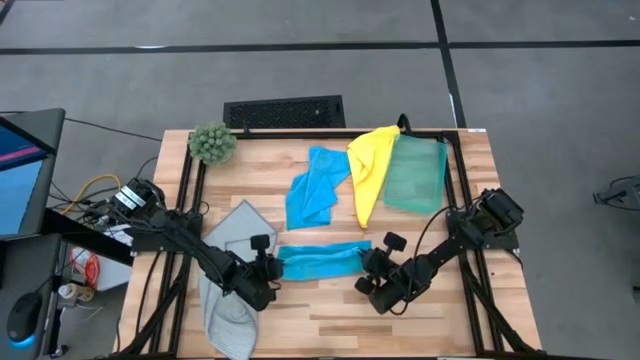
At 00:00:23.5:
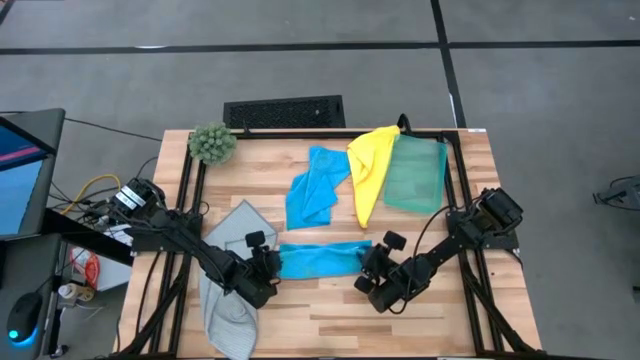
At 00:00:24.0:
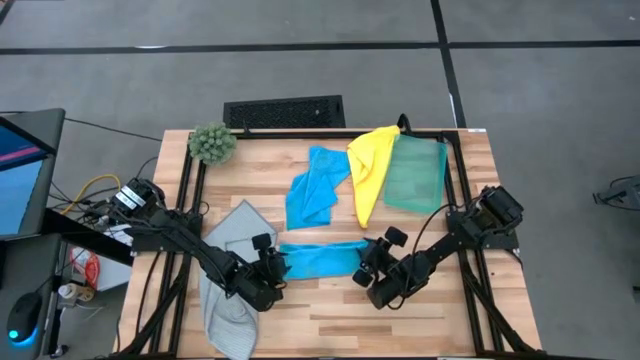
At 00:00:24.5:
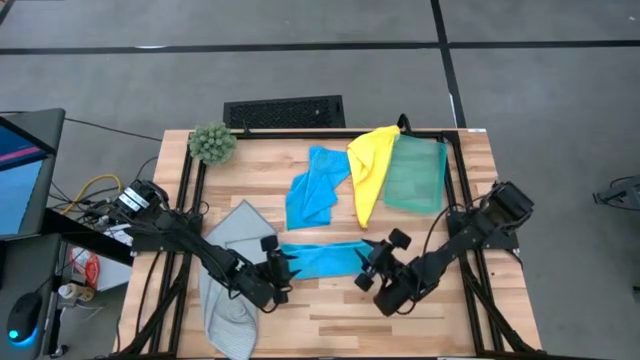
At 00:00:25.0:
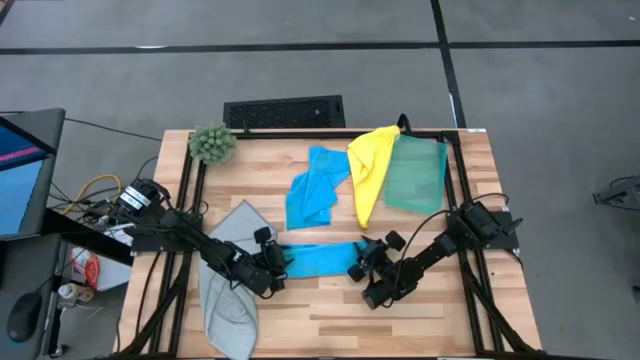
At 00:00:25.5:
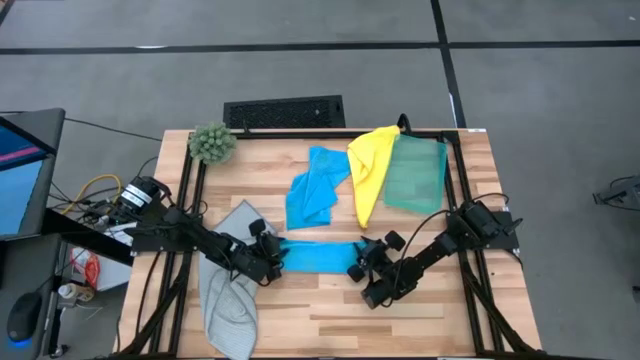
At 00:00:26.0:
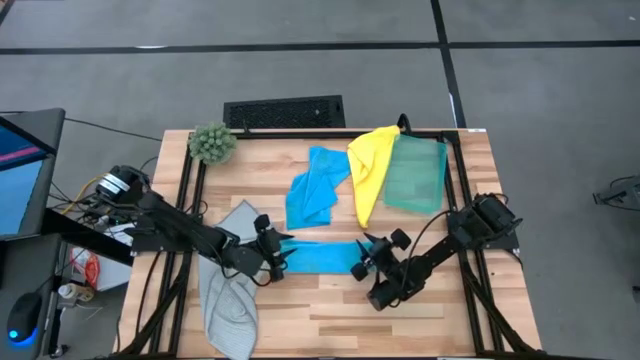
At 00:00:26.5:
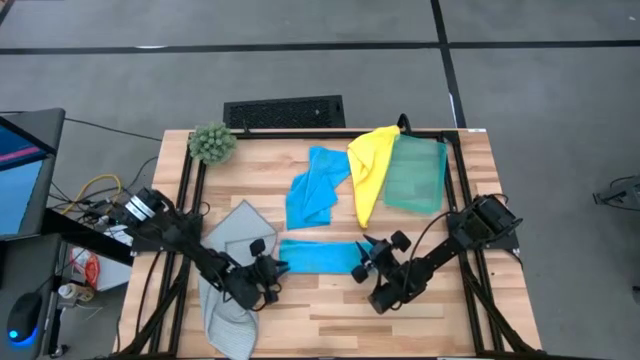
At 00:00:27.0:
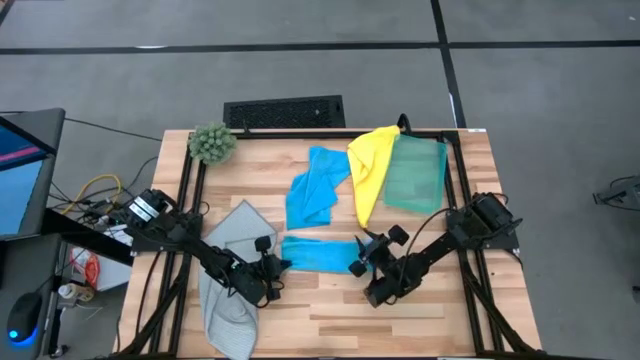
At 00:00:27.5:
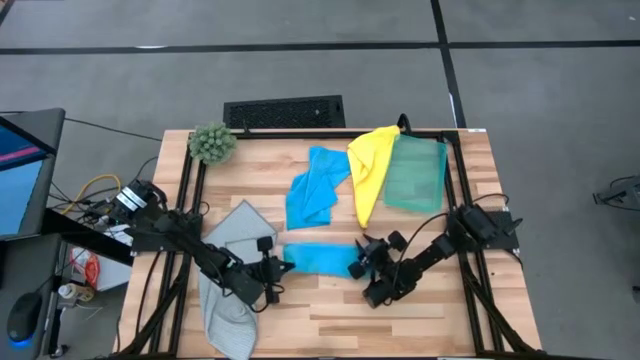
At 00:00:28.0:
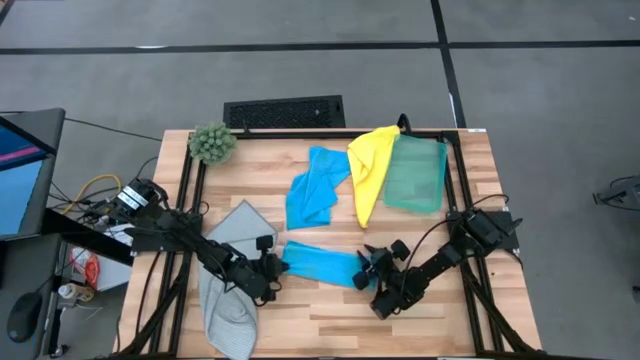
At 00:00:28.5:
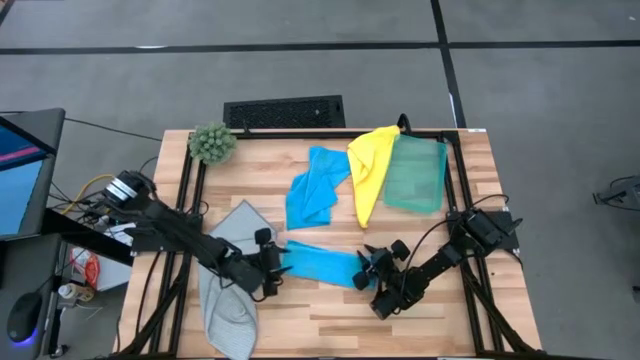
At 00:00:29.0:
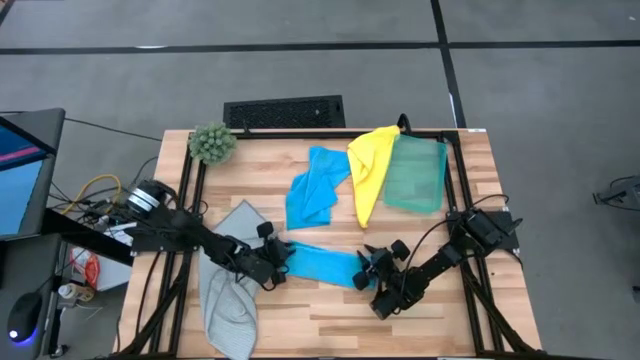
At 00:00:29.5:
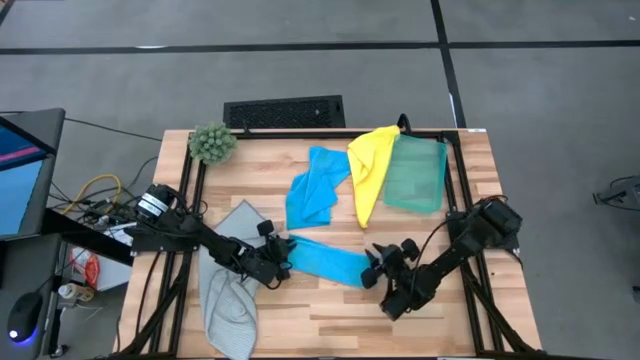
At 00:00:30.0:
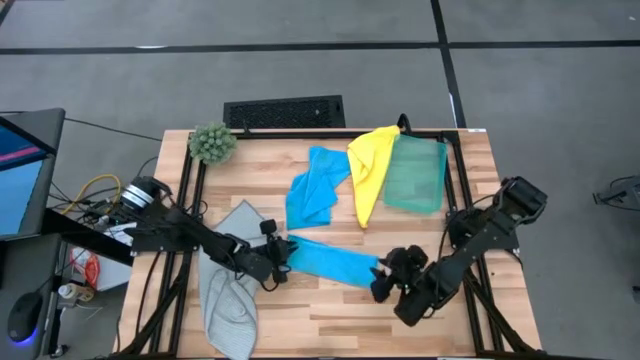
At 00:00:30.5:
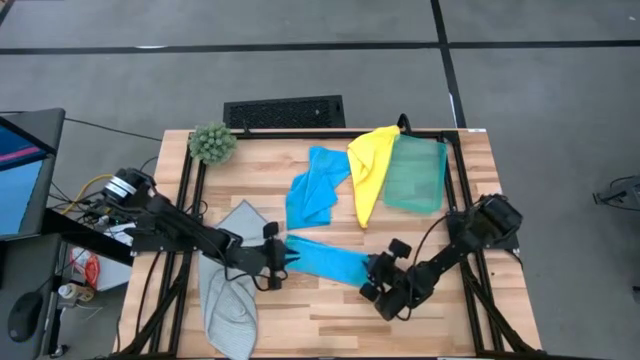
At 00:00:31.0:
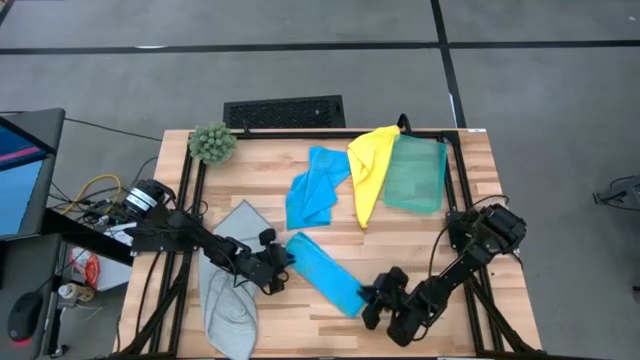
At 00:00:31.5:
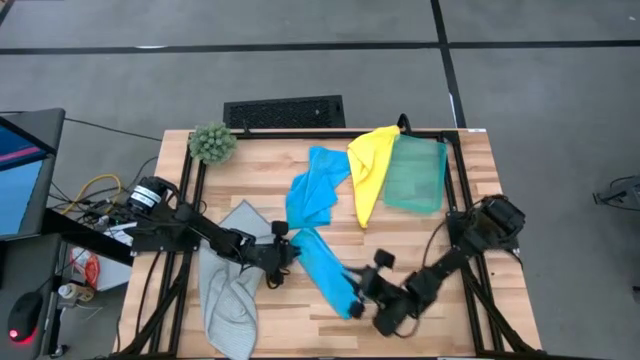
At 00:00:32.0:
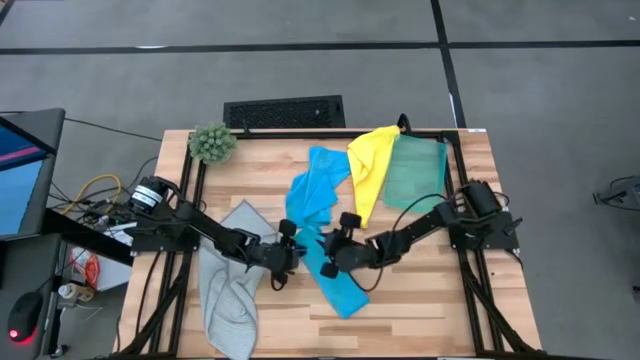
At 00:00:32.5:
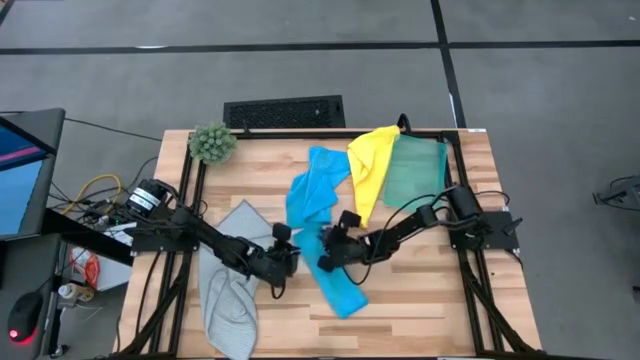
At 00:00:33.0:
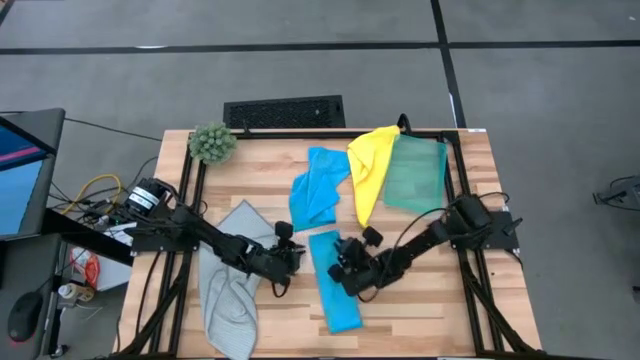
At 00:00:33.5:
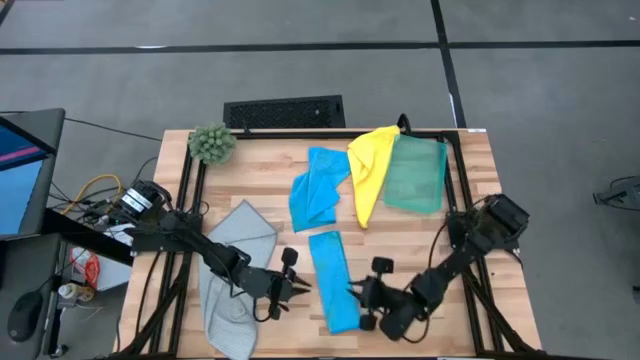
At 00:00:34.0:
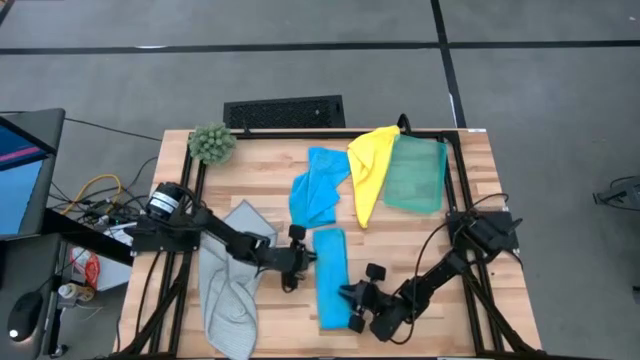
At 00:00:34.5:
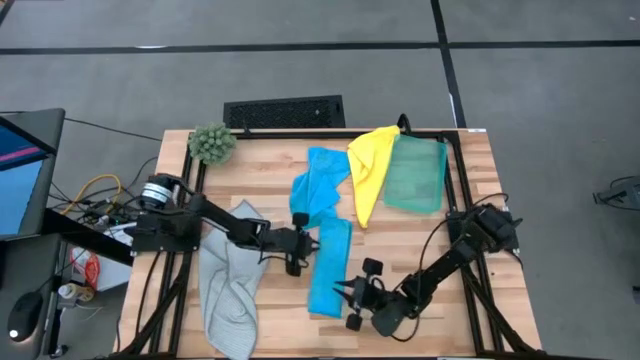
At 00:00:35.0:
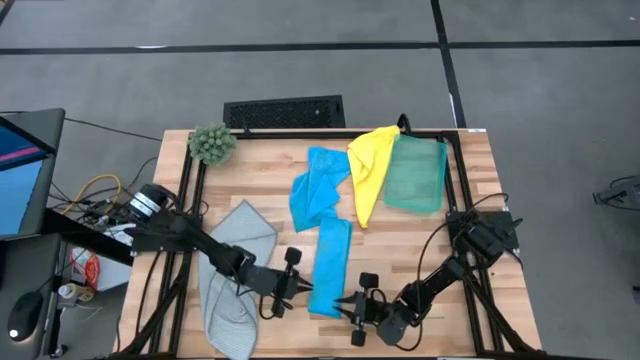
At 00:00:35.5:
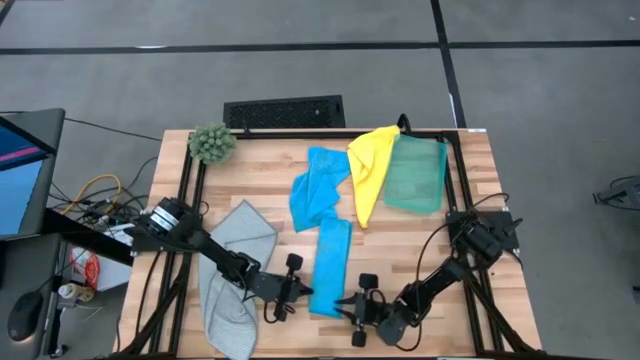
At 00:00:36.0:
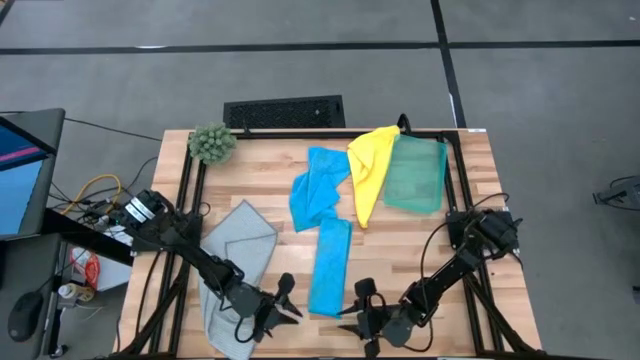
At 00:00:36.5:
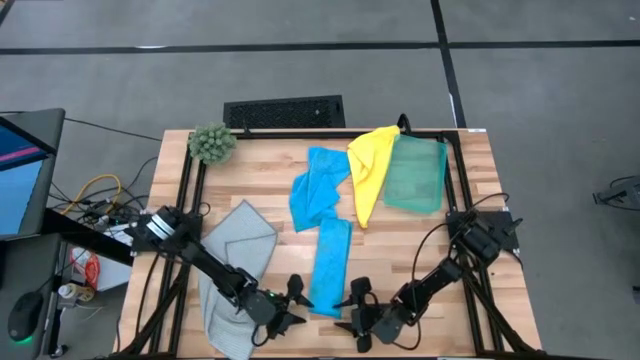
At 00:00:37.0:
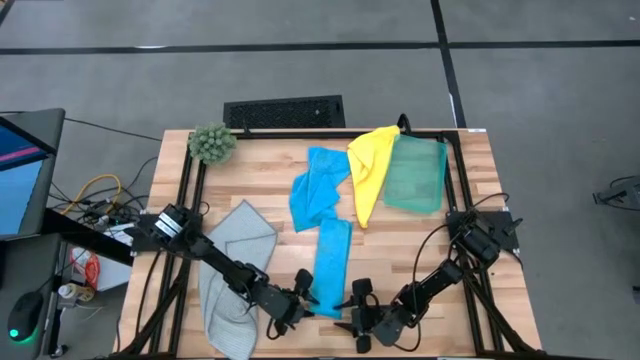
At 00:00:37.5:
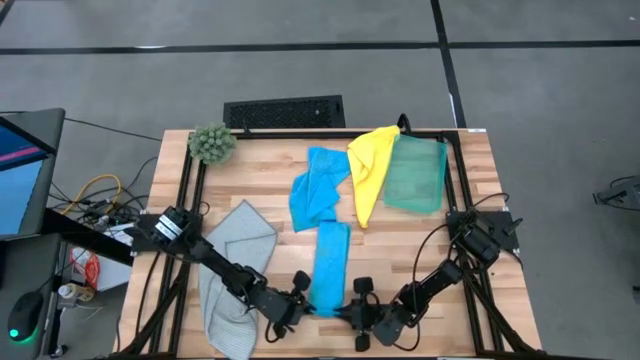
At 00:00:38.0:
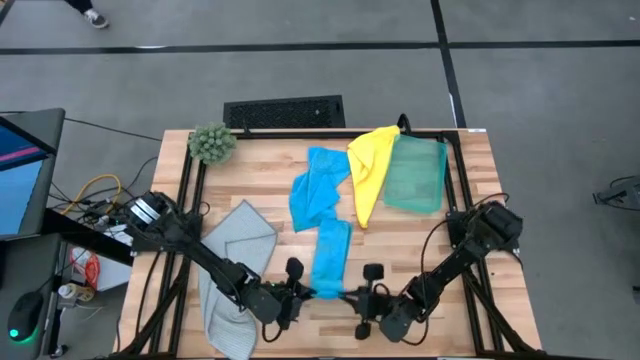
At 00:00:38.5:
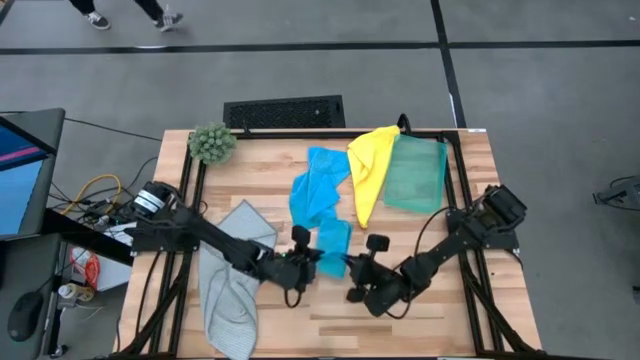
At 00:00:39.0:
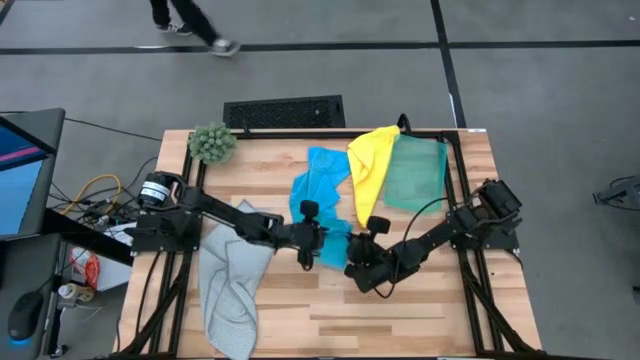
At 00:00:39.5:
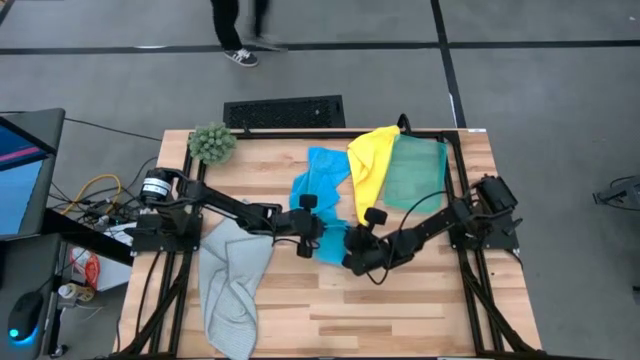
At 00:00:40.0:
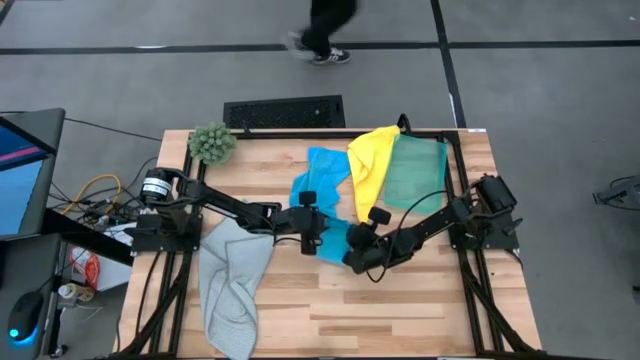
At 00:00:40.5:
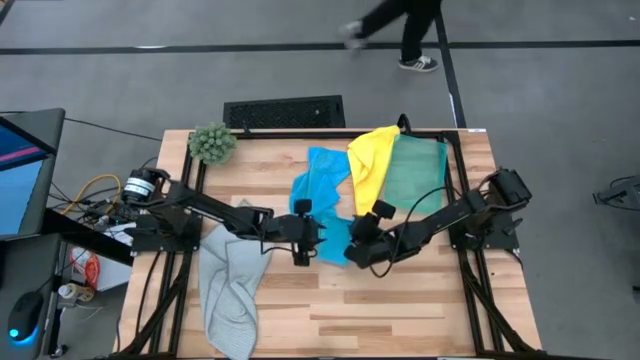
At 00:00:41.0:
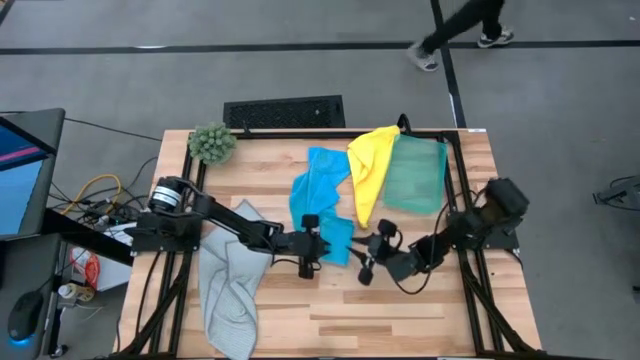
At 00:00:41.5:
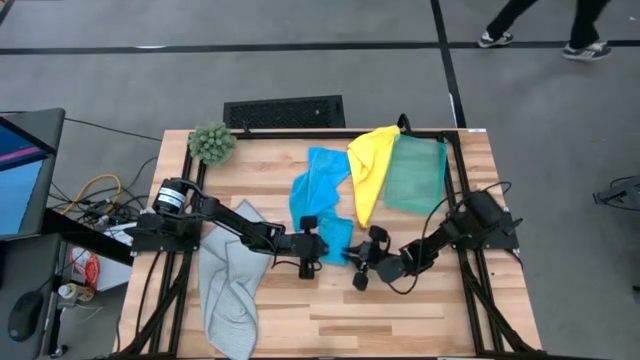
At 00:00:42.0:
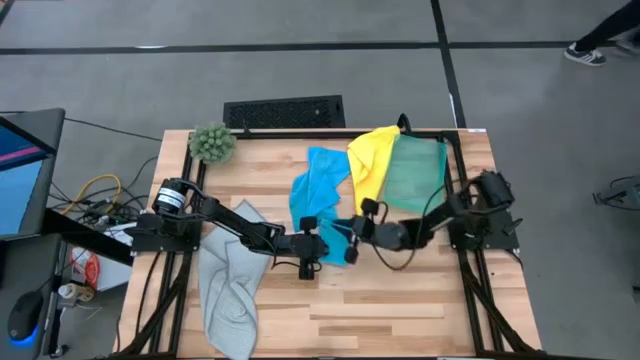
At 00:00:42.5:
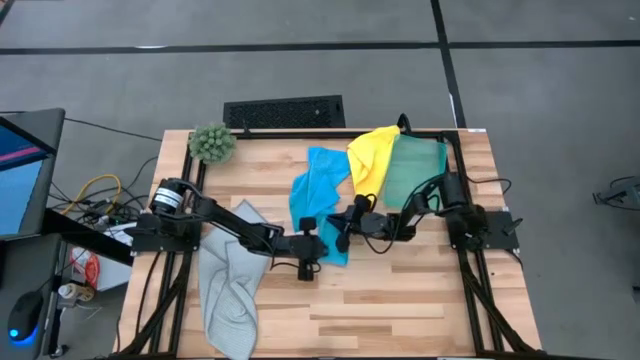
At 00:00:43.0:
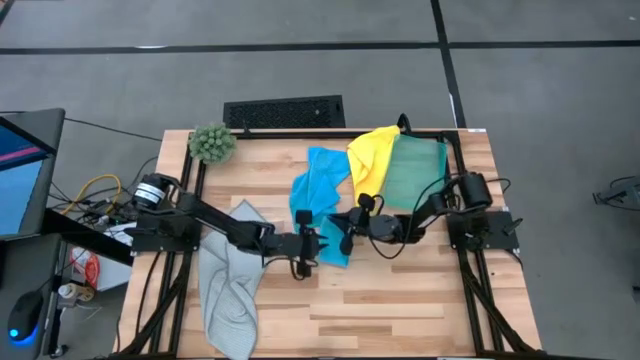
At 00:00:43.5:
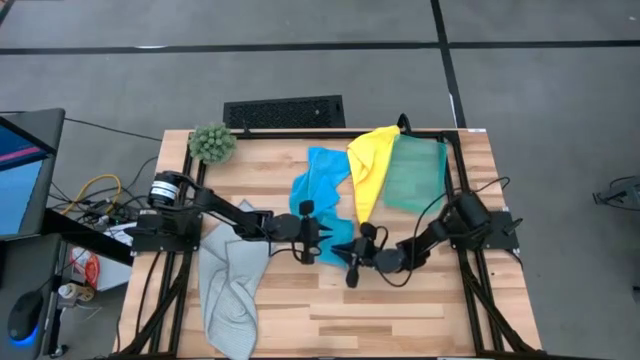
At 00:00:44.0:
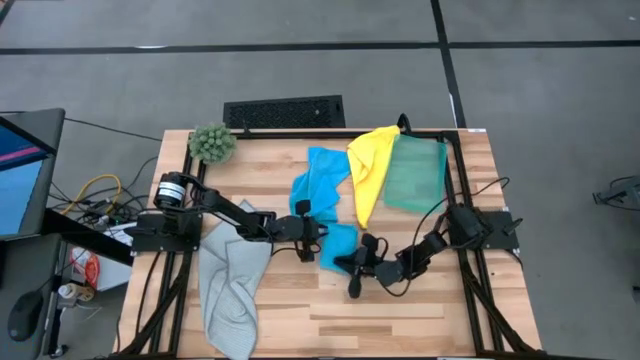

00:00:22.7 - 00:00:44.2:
Task: Fold microfiber towels
Fold the blue microfiber cloth
